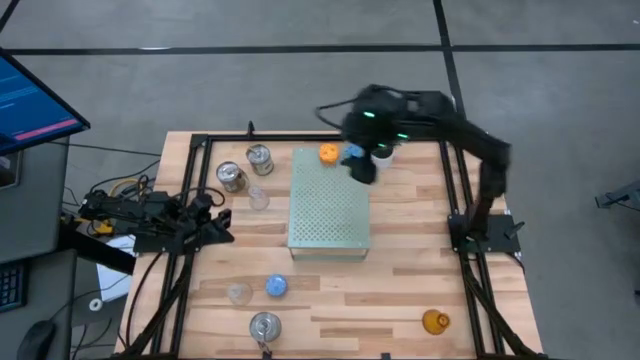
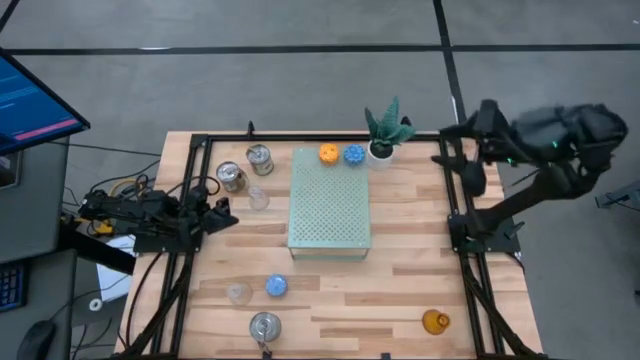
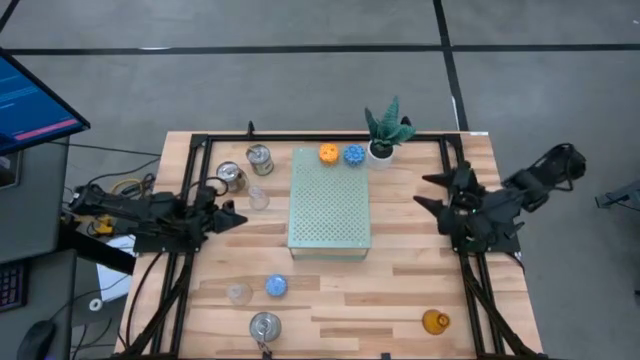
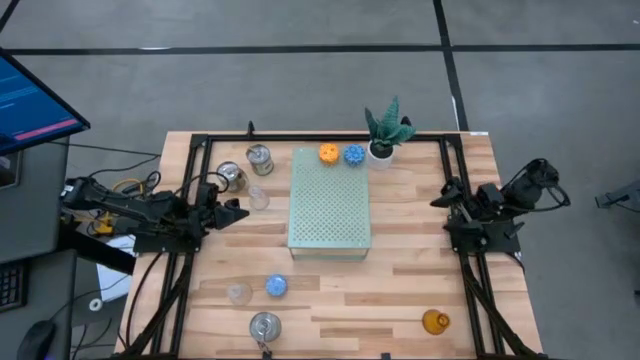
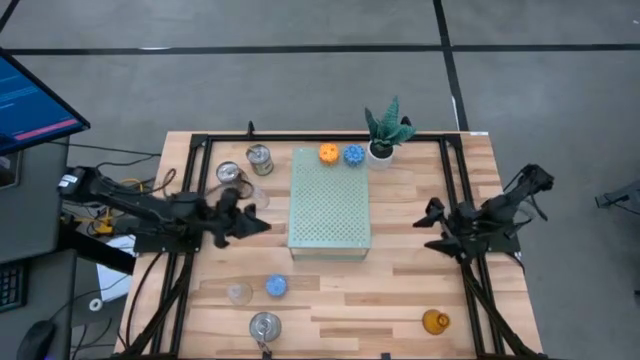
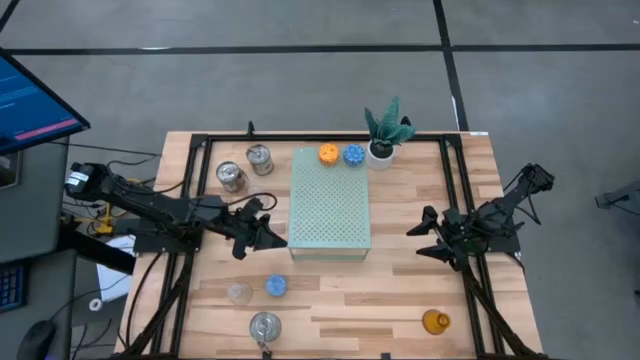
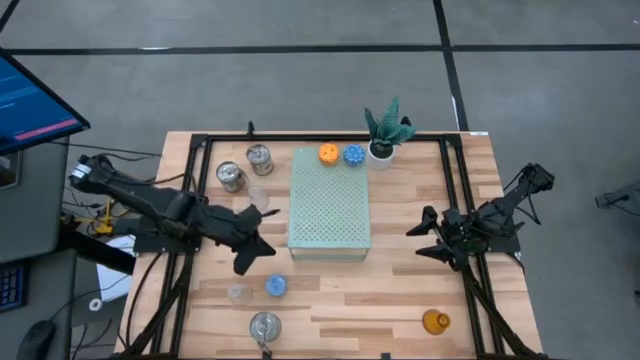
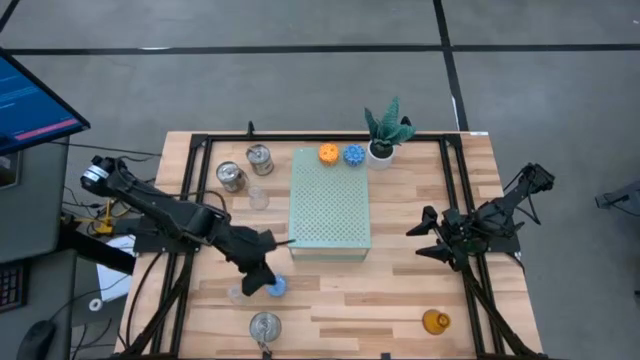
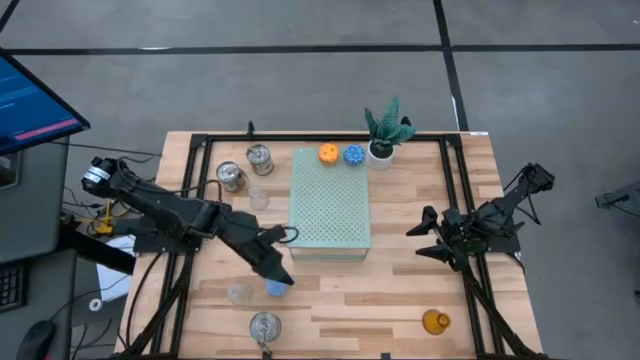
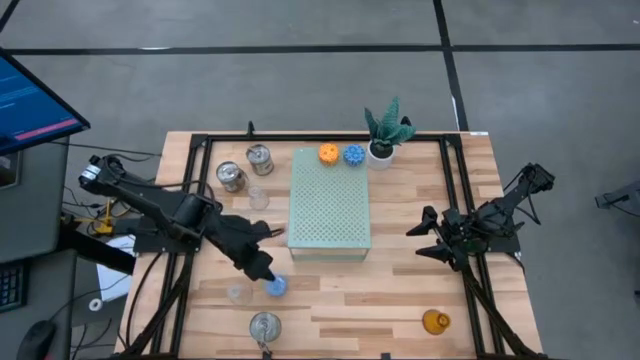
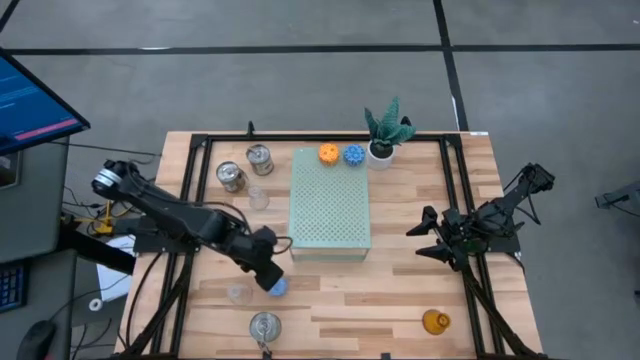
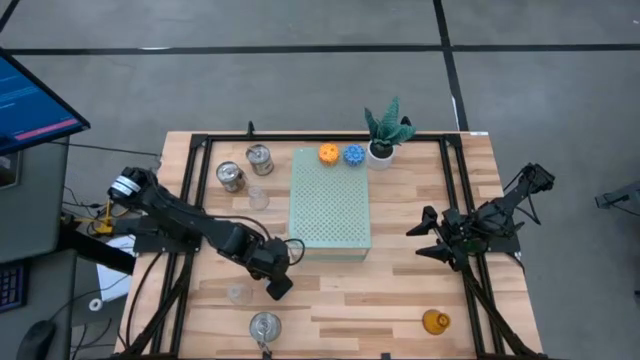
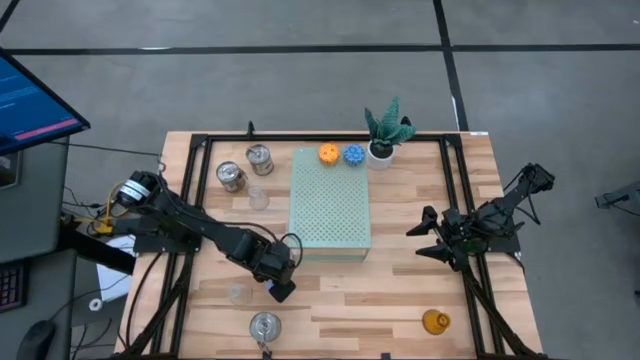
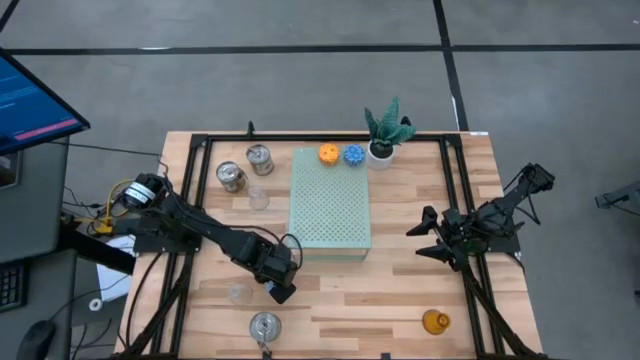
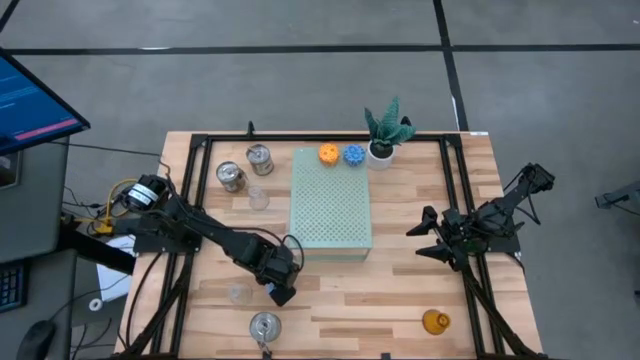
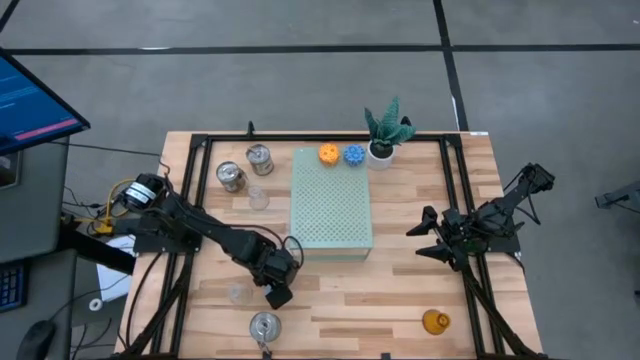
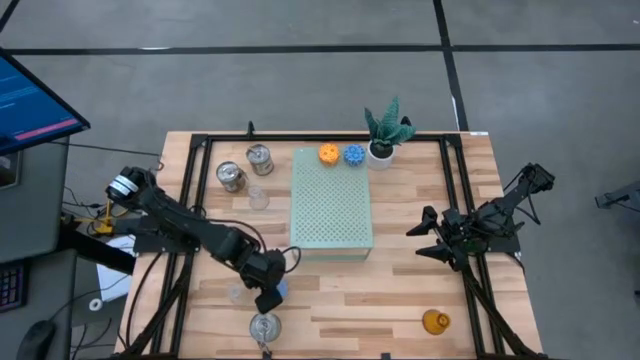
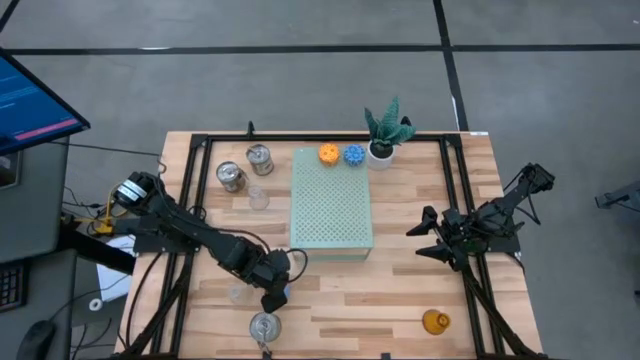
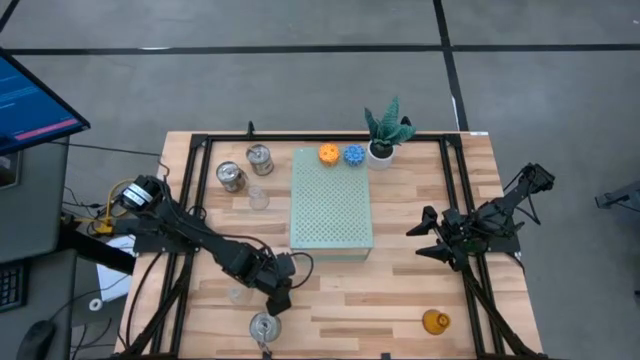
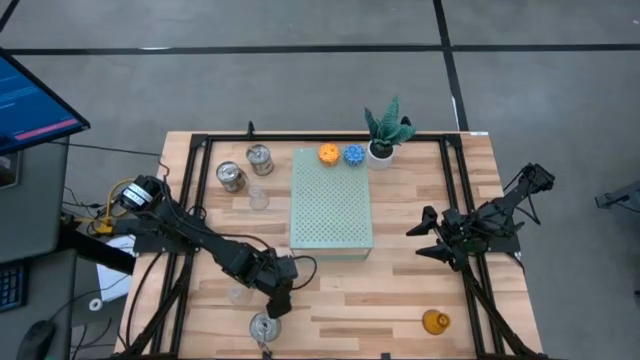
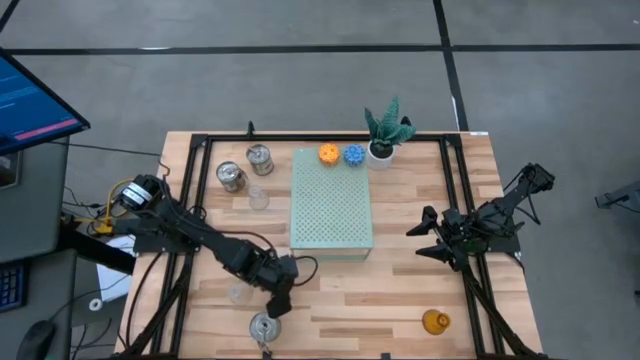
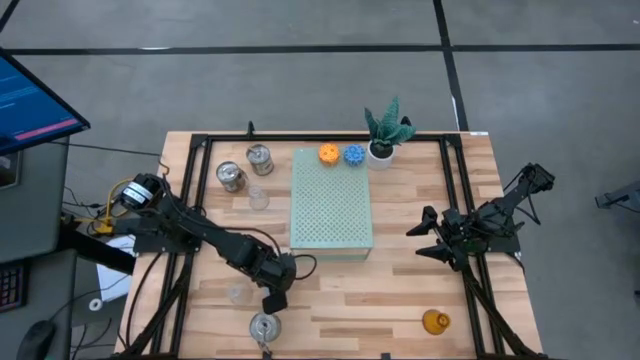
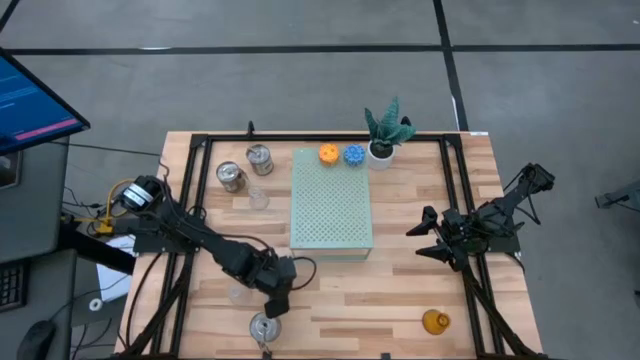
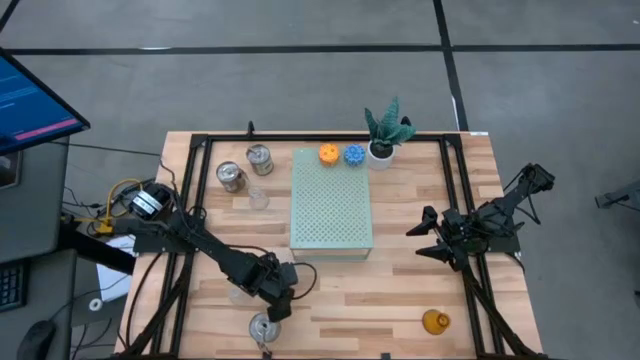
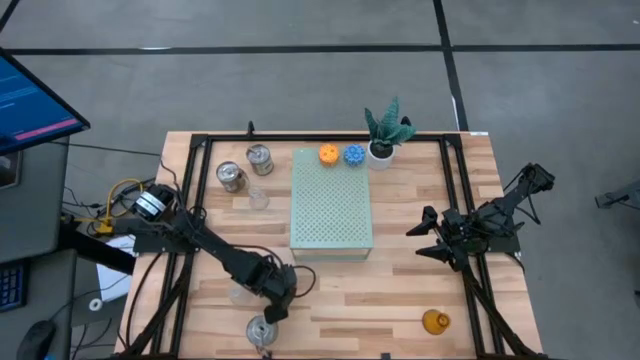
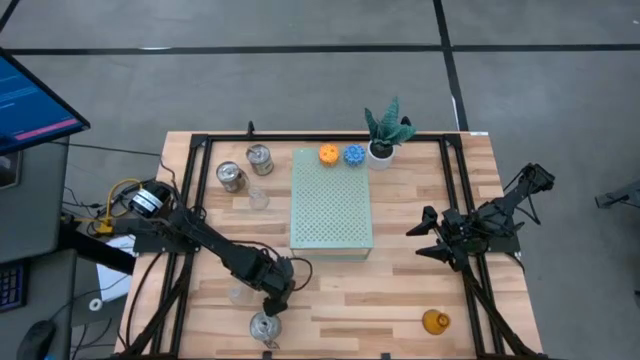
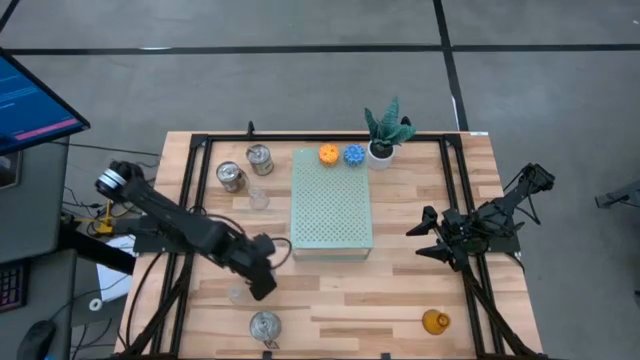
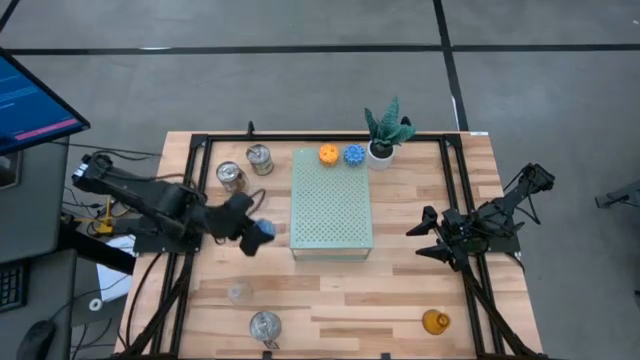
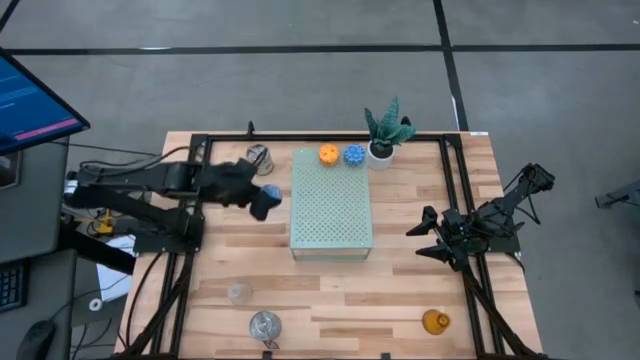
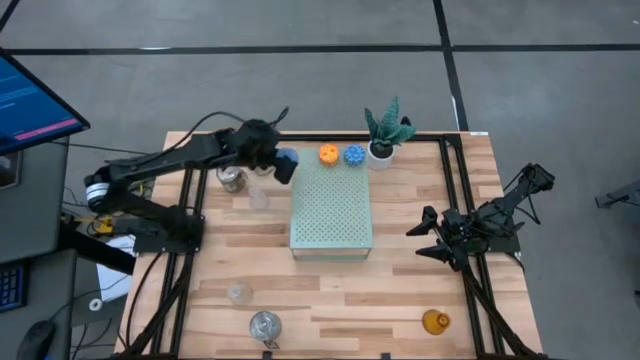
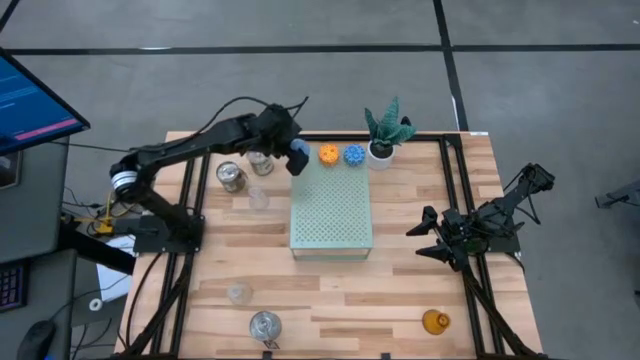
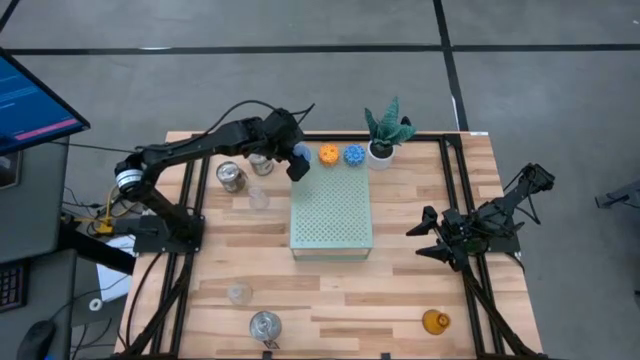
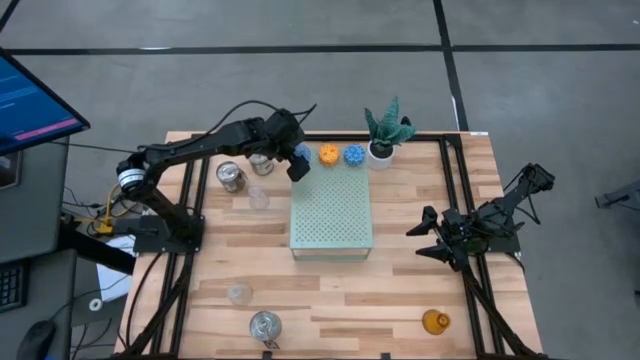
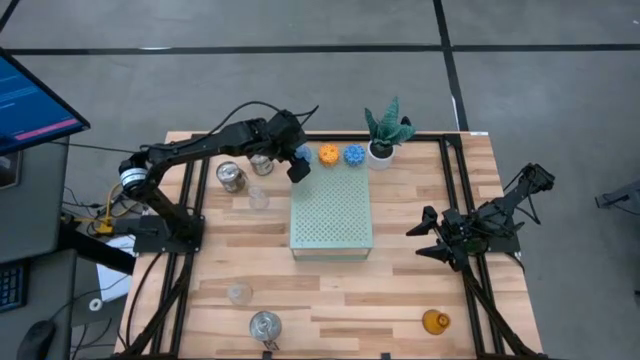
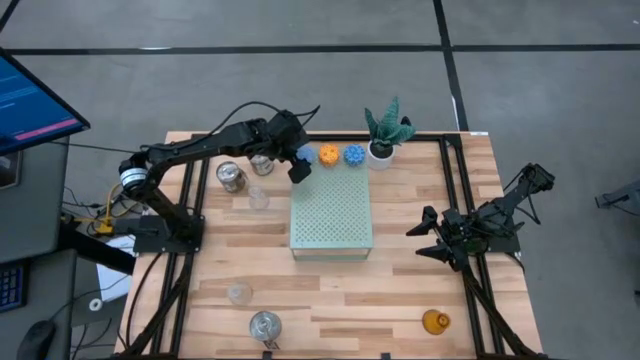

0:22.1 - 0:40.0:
Task: Stock candles and holders on shelf
Put the light blue scented candle on the shelf aligned with the other scented candles
